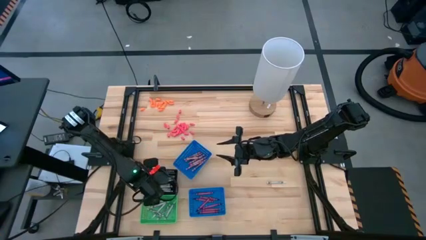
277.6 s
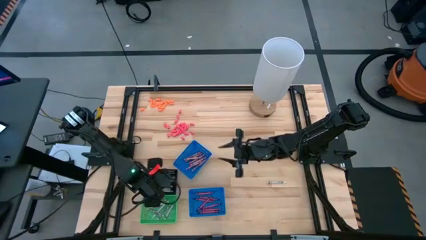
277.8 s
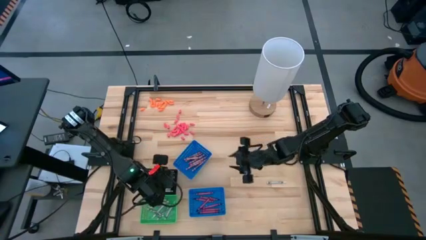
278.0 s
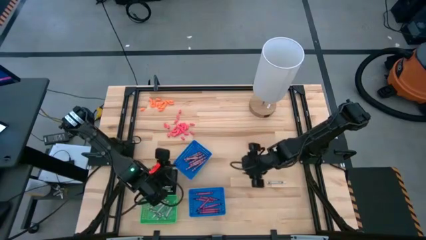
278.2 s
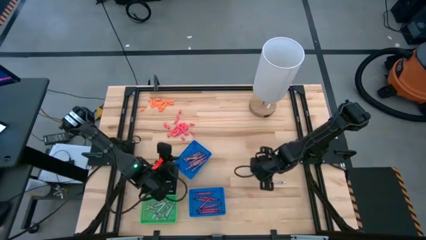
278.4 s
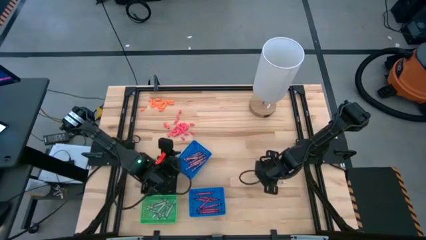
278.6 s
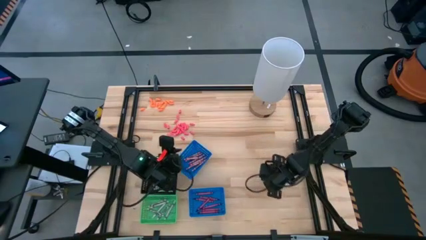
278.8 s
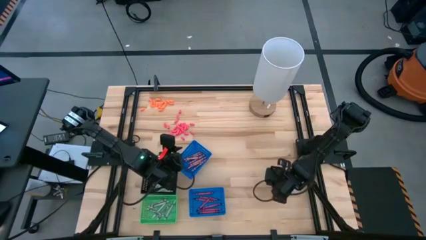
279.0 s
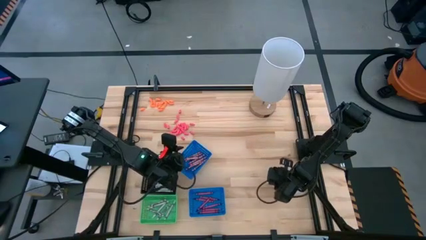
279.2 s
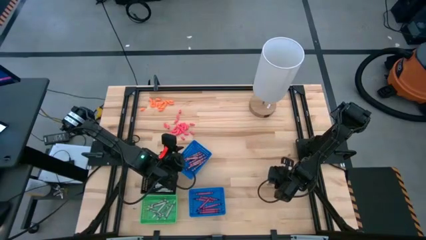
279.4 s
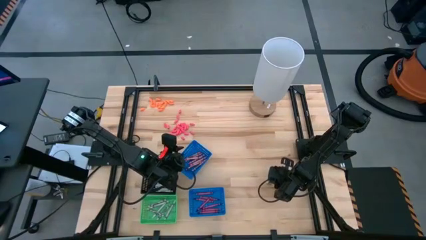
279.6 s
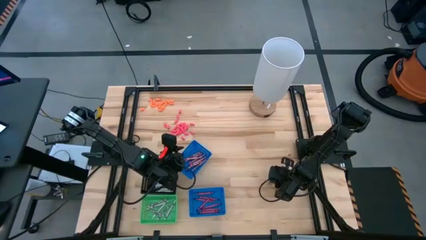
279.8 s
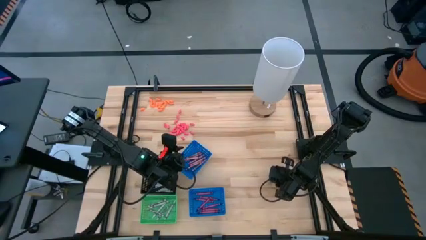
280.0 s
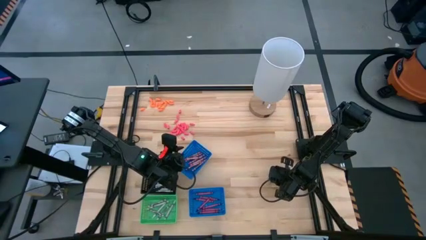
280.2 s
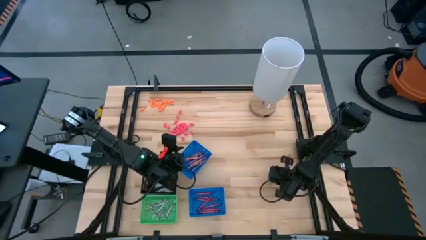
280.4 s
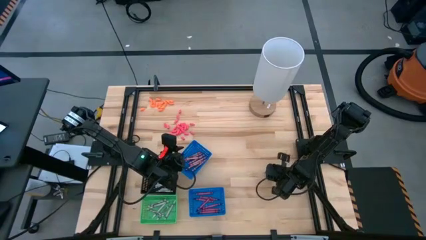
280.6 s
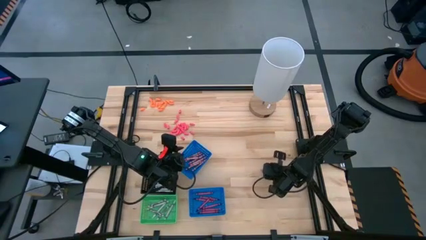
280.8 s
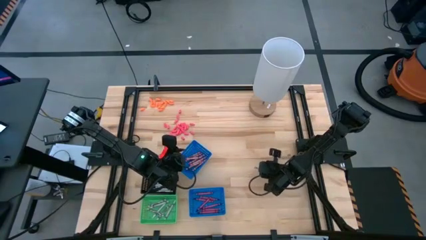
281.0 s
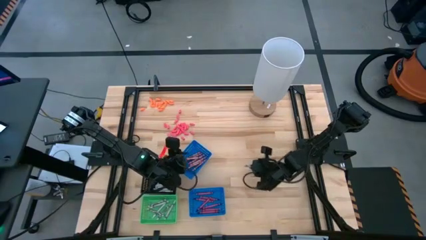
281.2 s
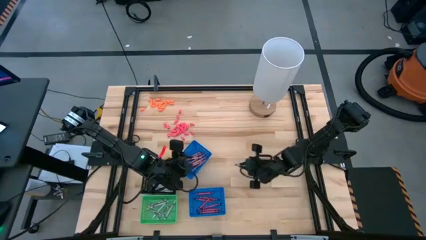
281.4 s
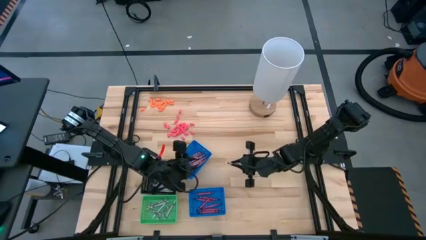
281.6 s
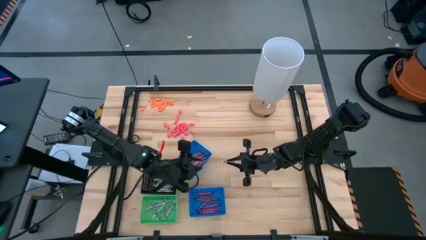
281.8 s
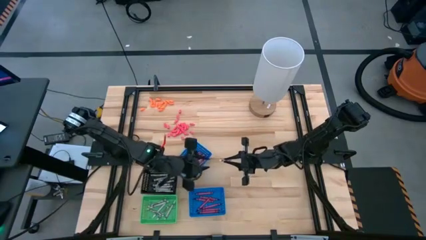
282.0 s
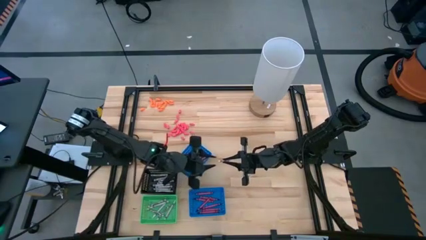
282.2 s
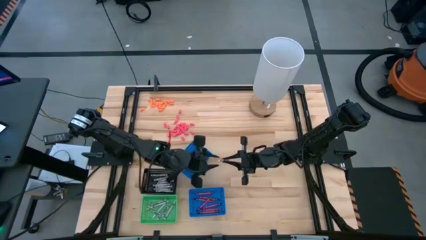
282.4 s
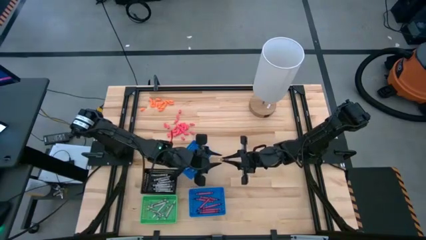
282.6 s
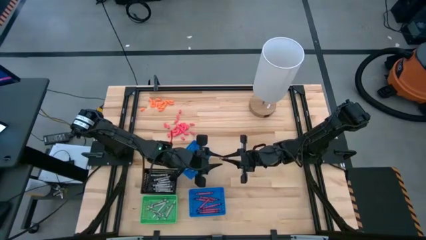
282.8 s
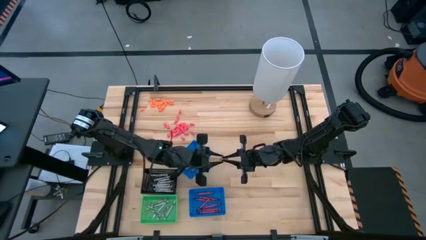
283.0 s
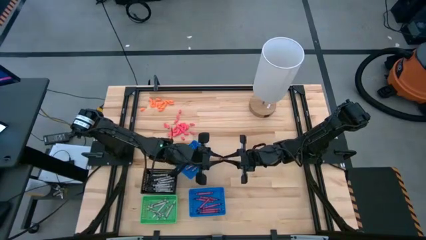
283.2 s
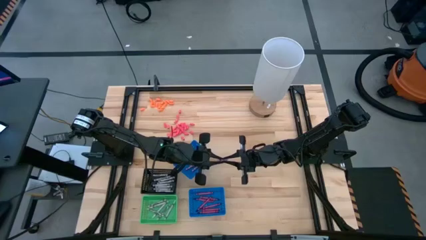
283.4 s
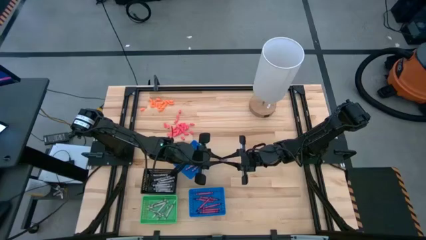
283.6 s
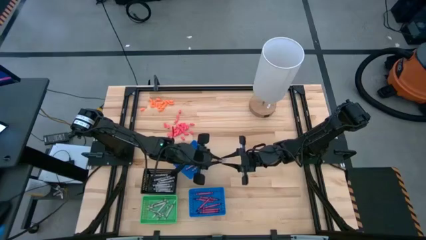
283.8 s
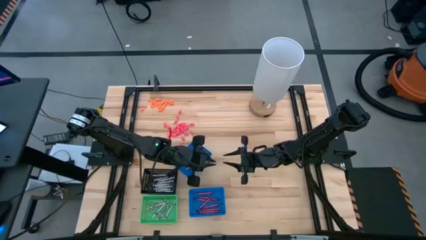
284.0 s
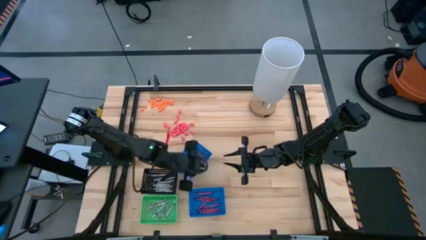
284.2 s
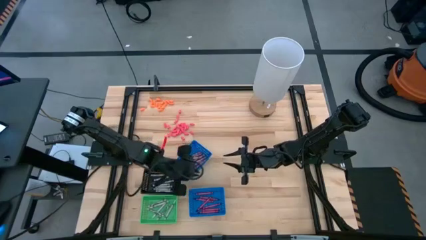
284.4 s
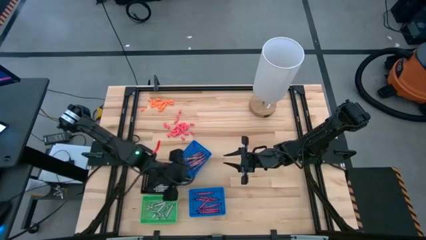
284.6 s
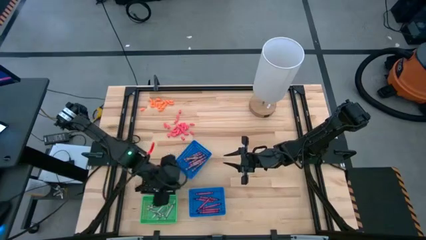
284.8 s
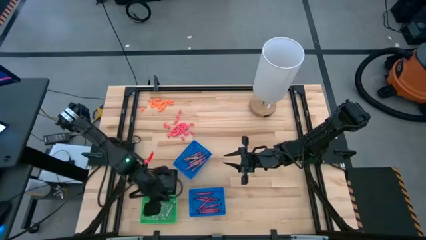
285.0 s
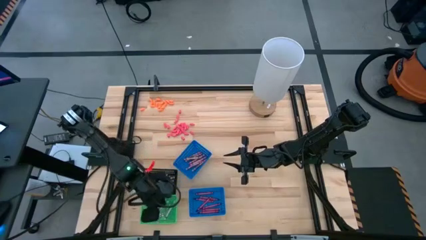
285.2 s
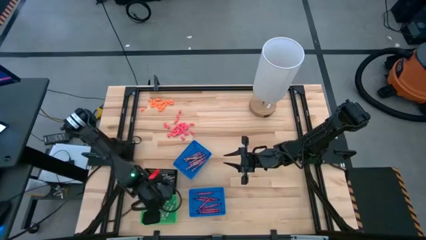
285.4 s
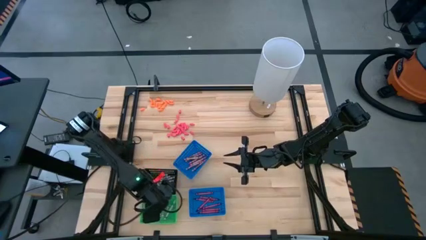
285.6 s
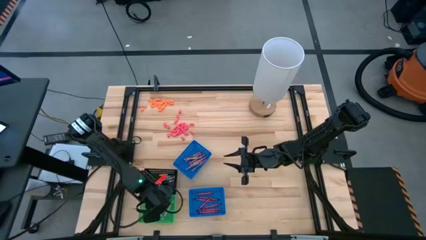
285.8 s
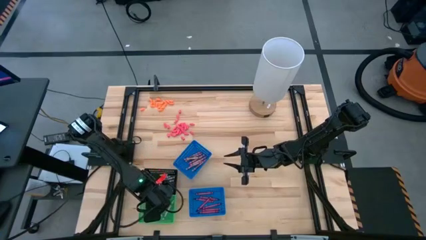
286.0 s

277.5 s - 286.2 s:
Task: Sort crayons
Put the white crayon into the green bin

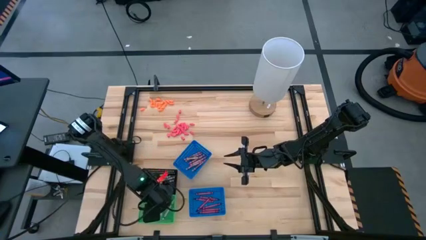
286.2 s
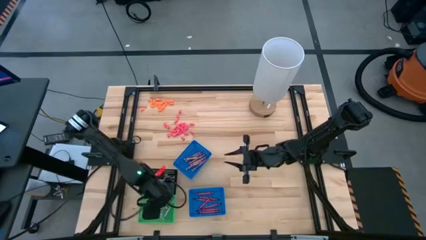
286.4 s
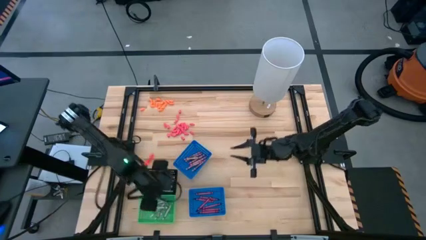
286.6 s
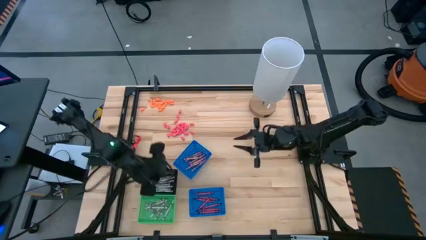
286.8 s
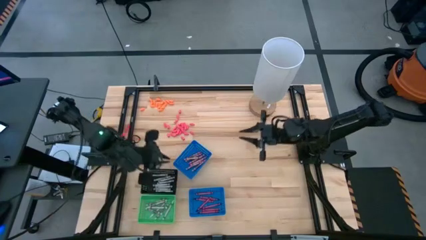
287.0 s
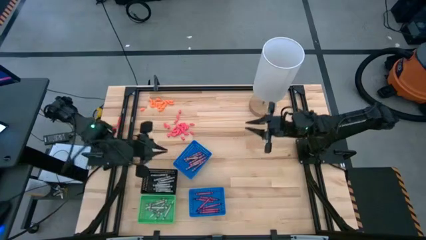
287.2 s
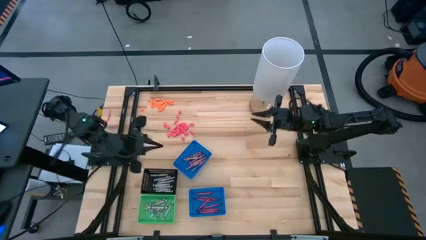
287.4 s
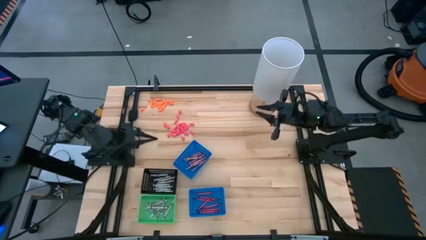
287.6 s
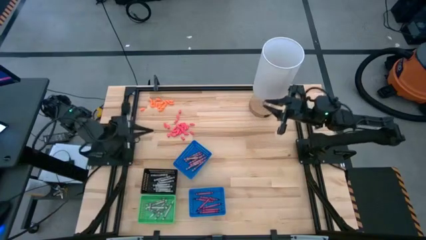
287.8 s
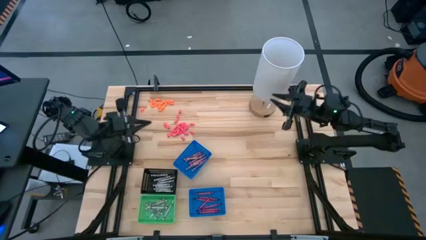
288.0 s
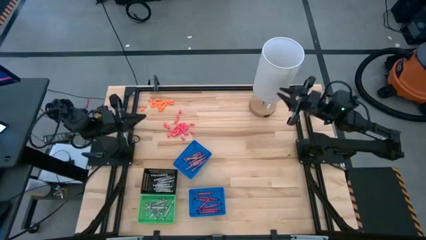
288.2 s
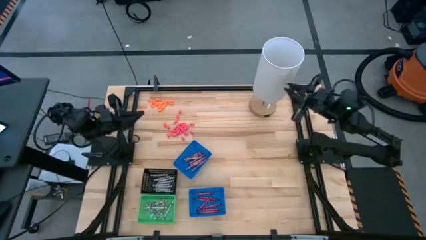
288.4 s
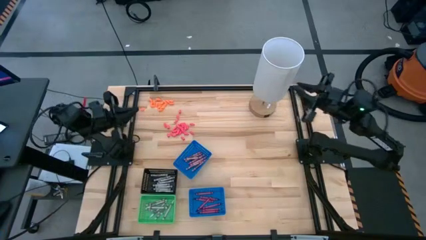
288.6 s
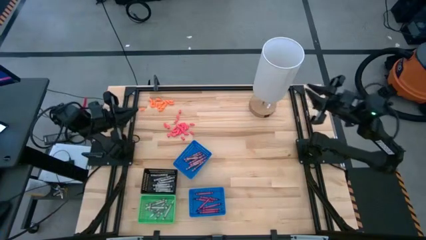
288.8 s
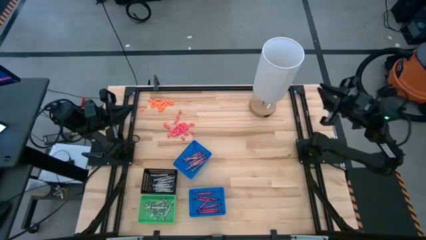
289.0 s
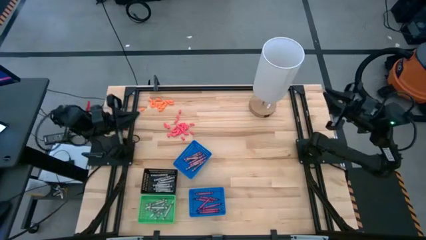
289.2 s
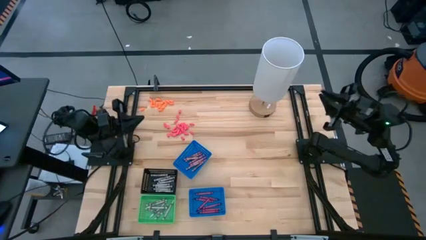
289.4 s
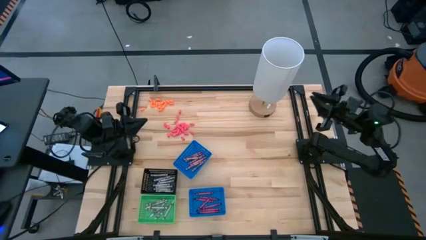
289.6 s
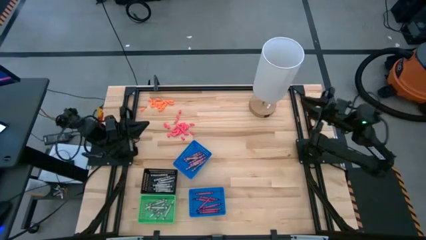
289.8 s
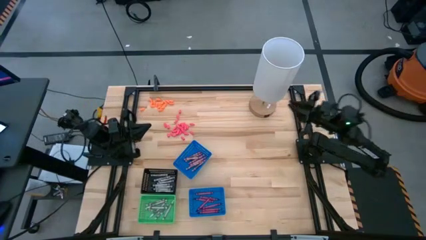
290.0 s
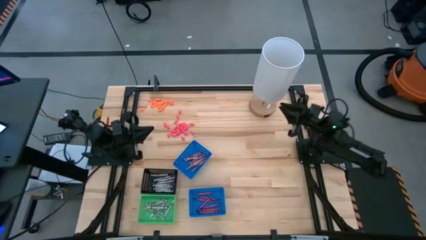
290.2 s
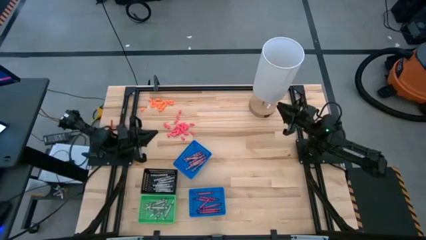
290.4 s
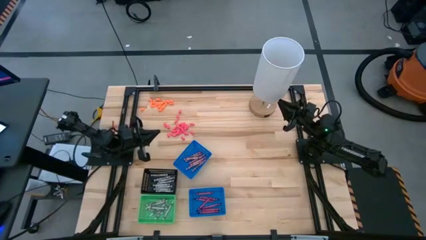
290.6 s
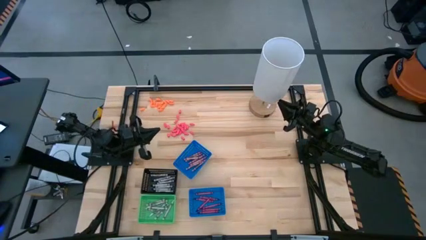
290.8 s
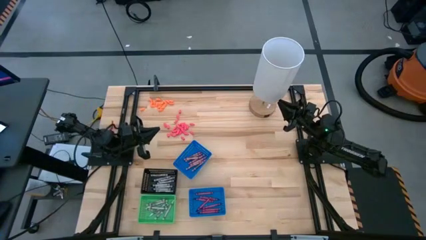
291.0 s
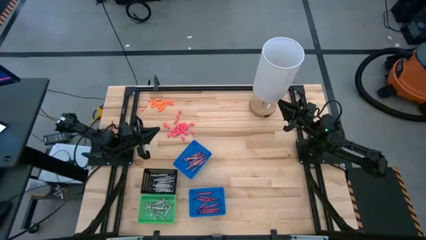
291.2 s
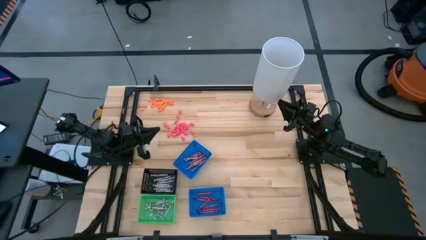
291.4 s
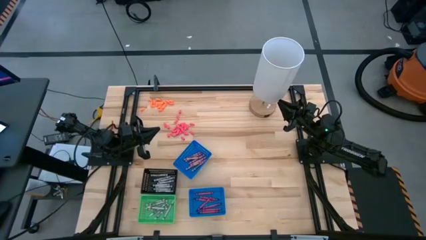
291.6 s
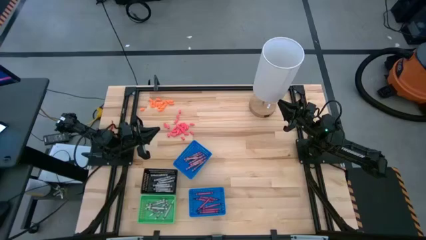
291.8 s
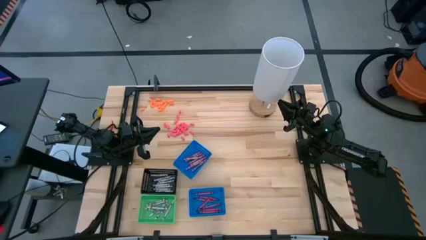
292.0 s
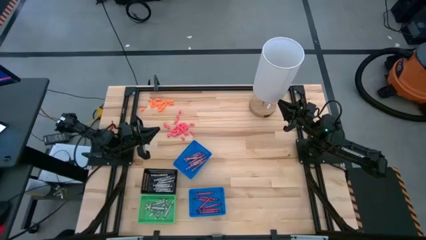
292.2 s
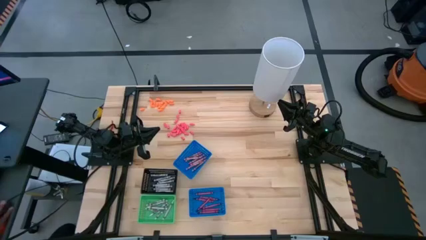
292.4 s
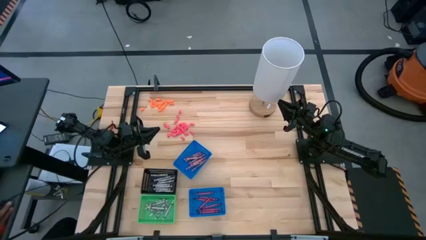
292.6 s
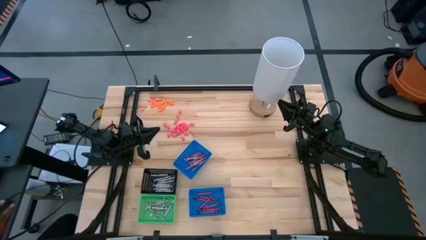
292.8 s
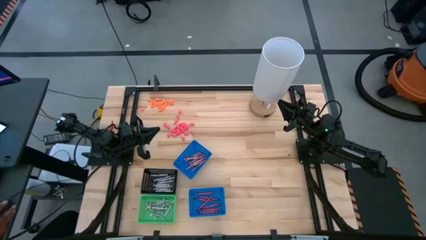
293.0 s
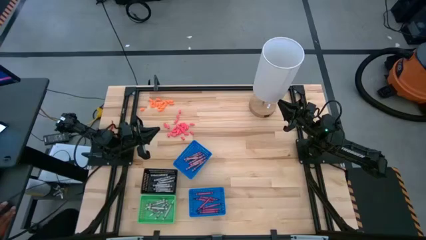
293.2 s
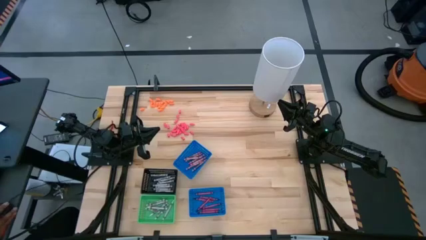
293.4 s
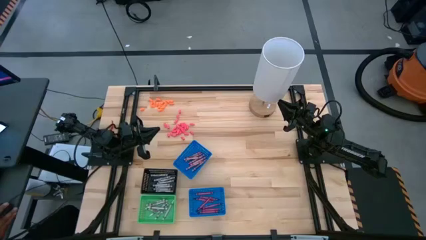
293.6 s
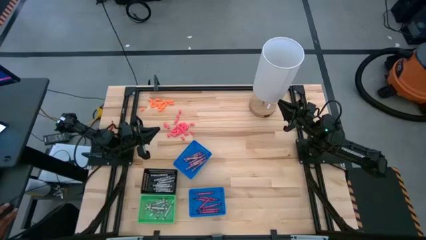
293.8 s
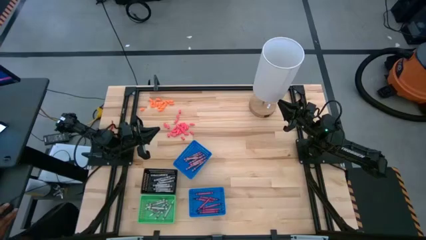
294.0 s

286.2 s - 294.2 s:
Return to Home Position
